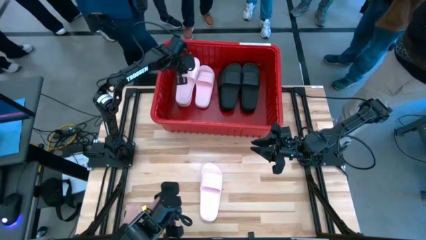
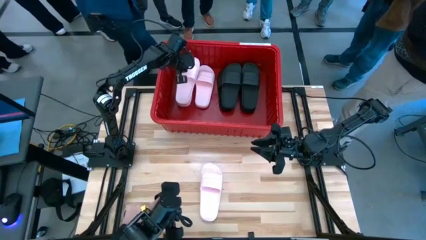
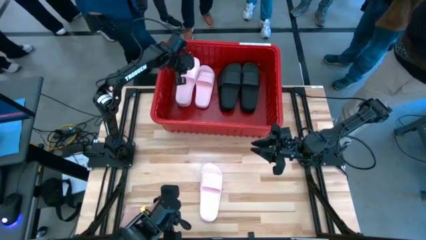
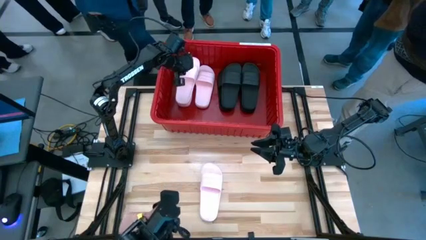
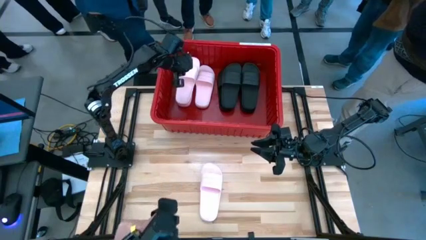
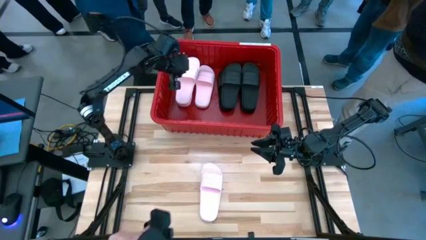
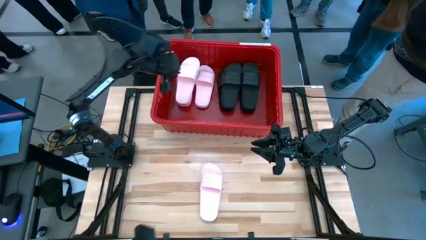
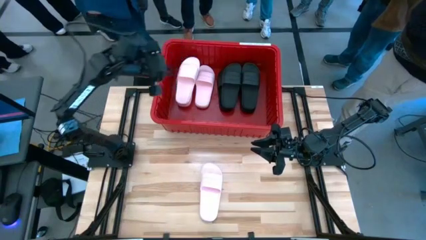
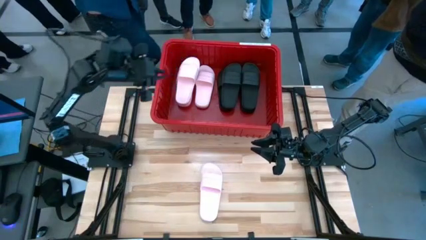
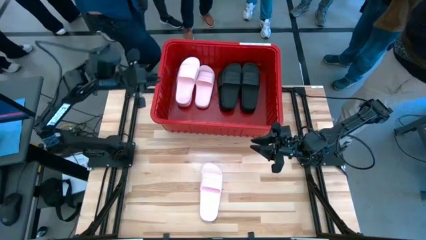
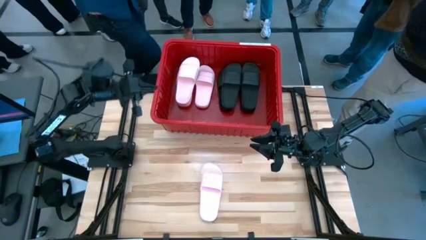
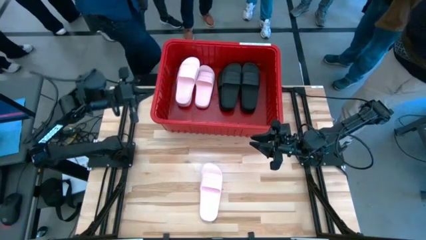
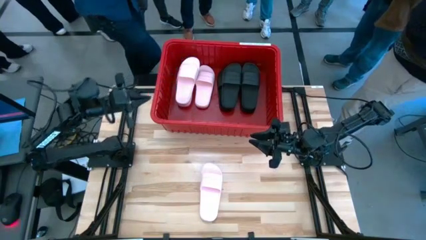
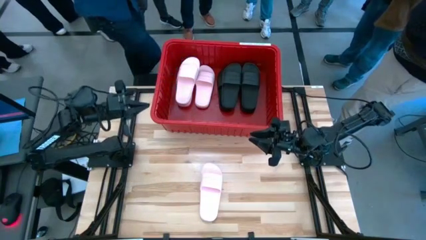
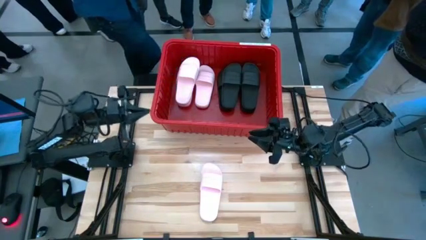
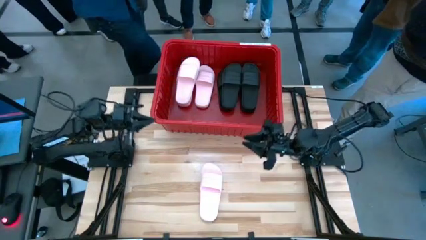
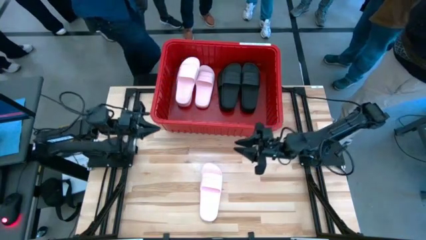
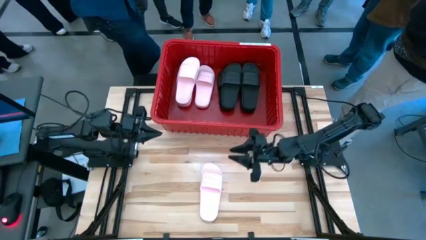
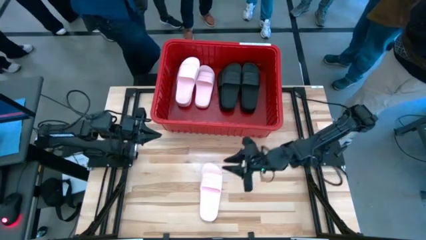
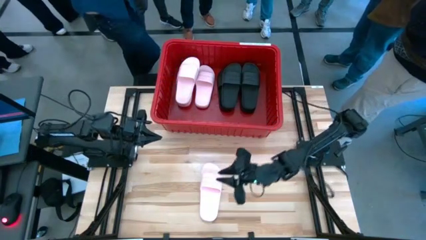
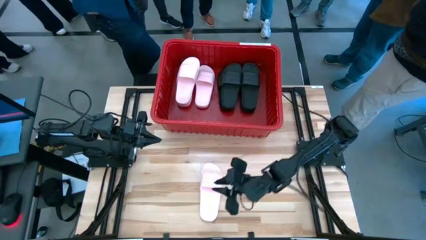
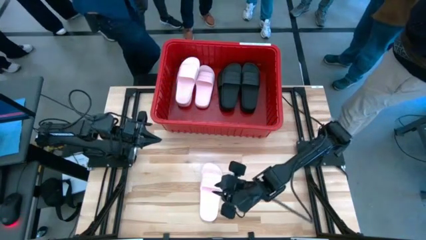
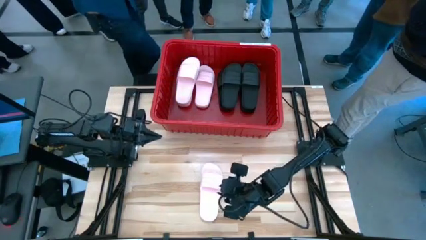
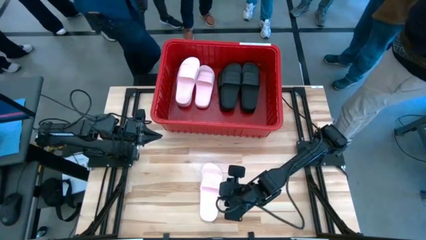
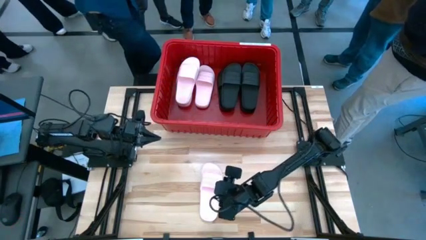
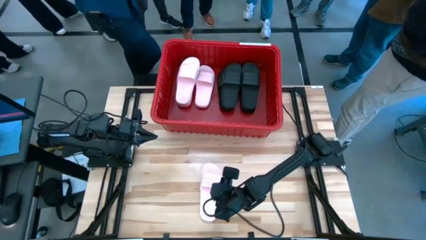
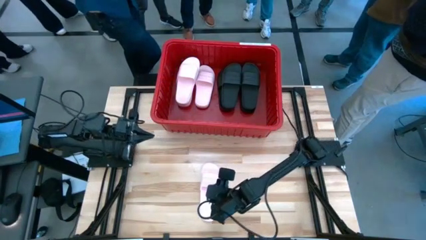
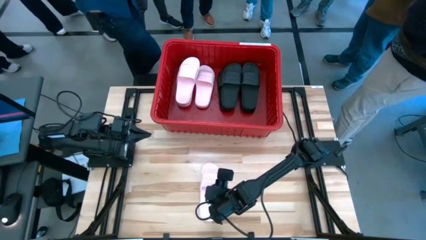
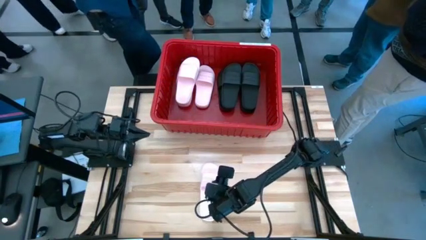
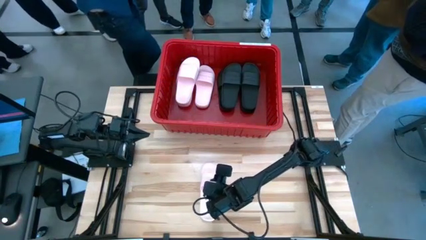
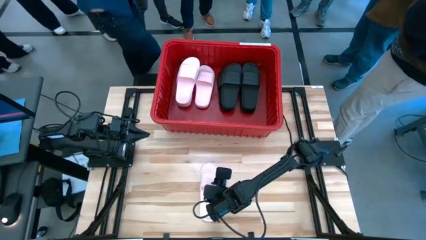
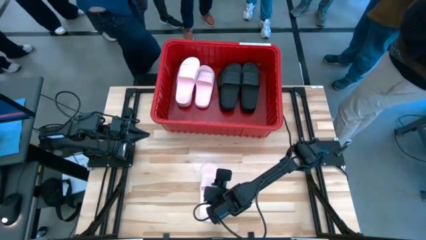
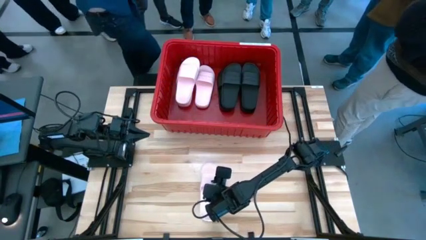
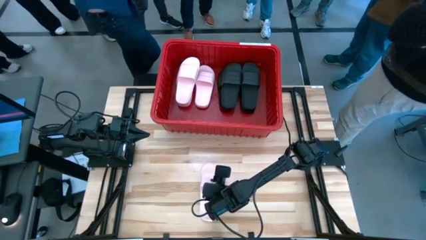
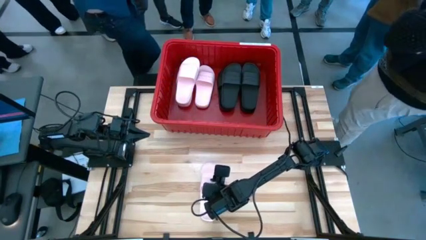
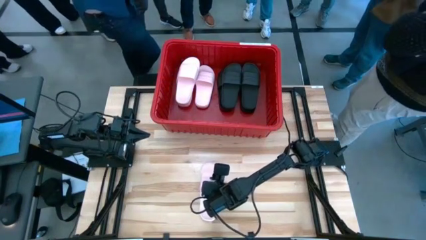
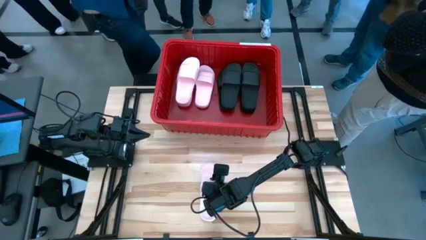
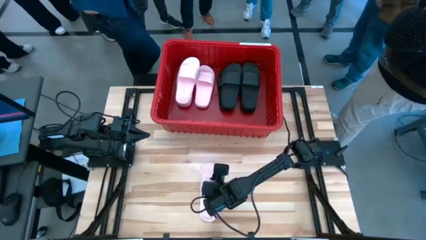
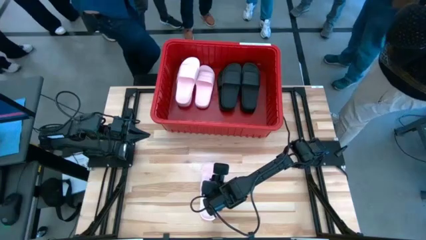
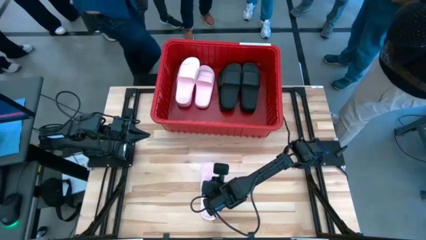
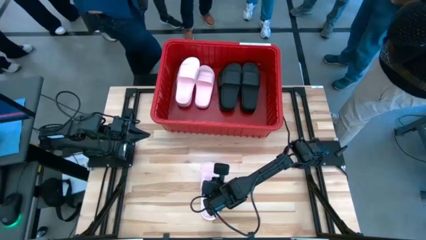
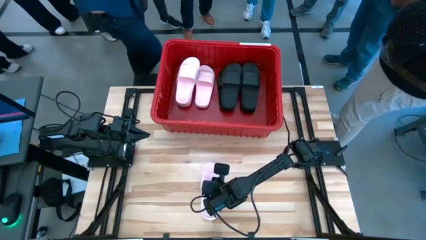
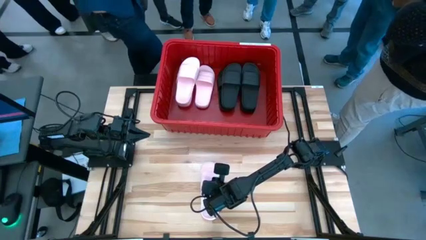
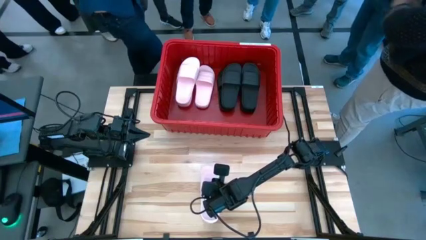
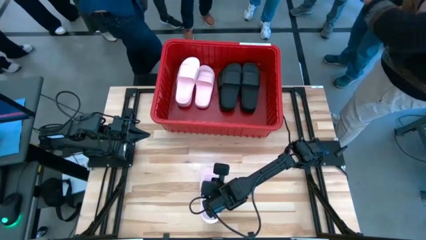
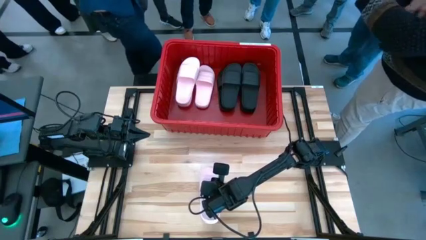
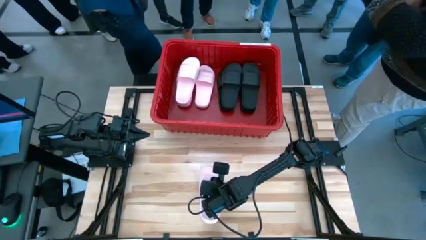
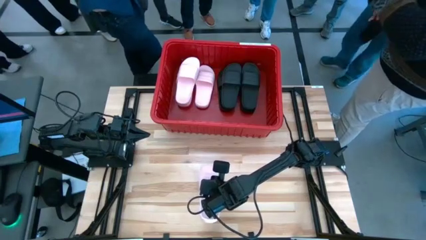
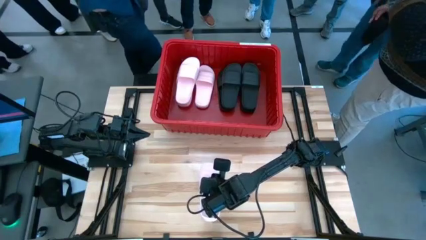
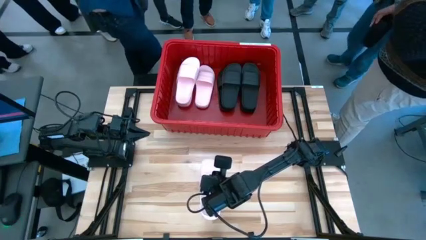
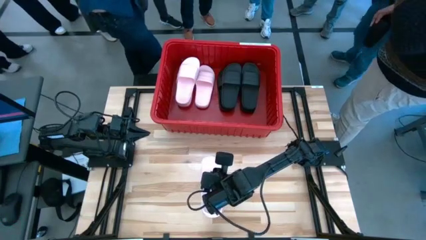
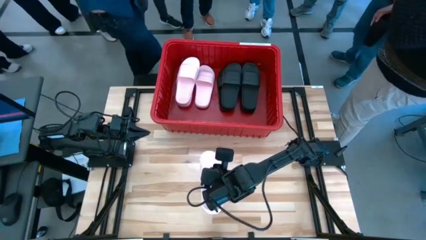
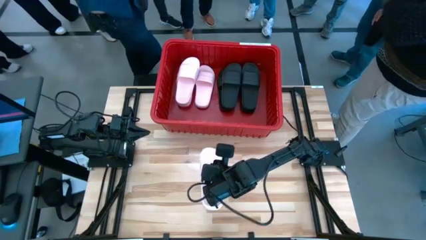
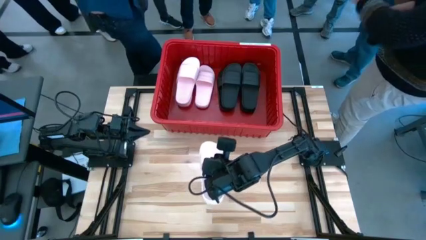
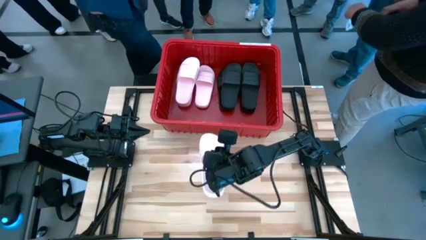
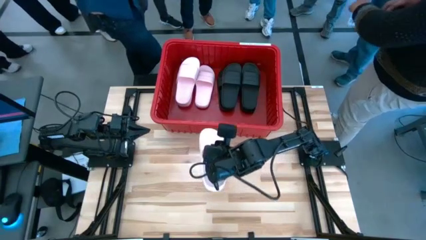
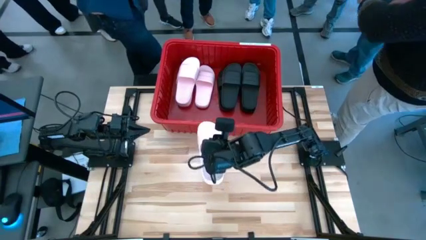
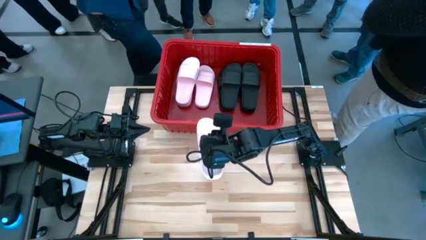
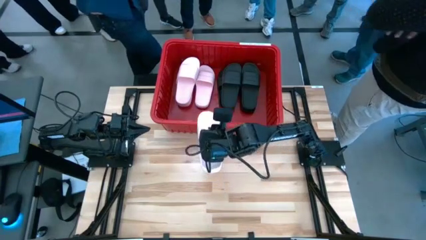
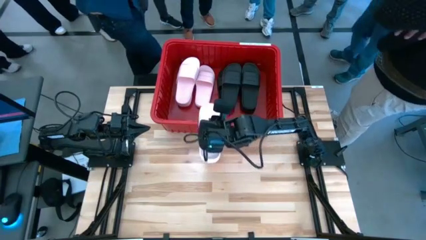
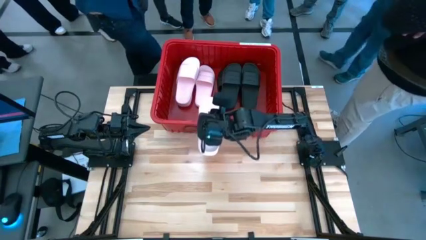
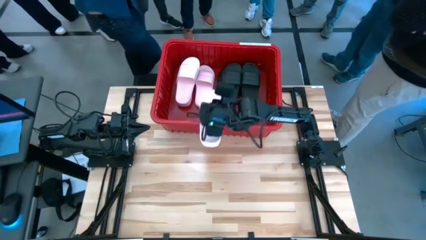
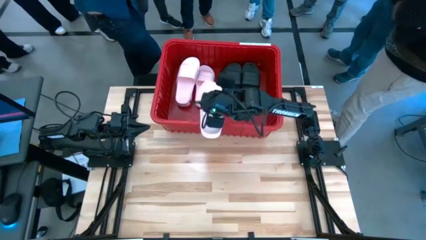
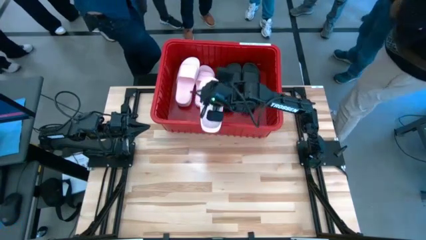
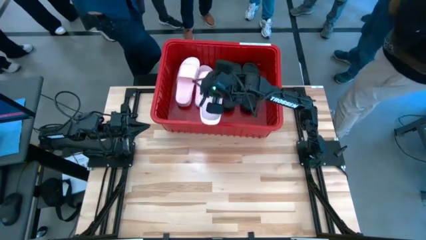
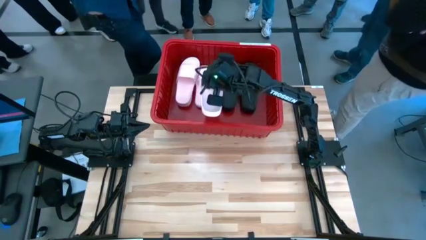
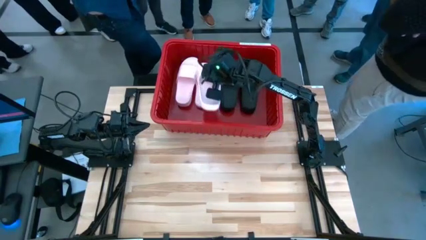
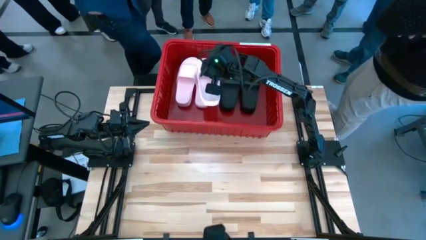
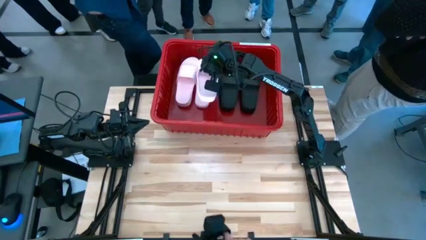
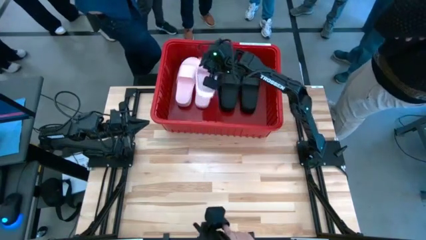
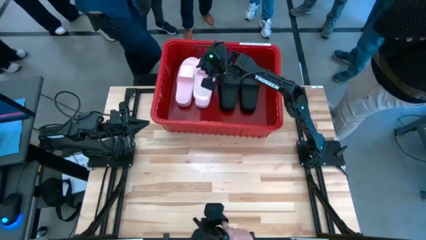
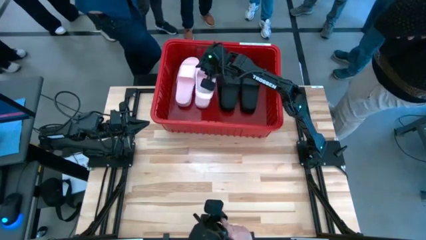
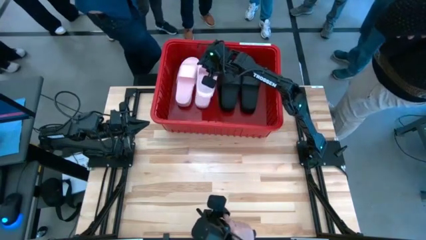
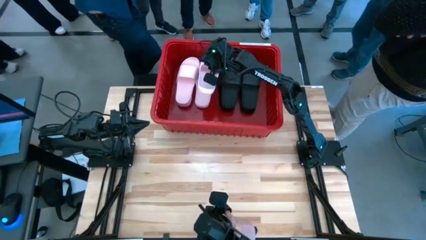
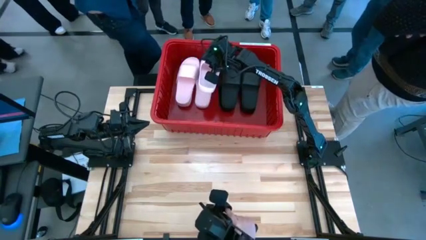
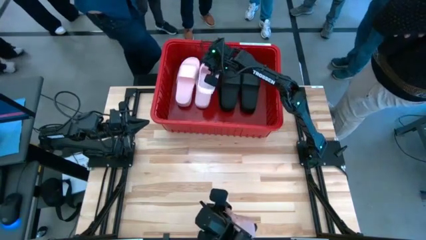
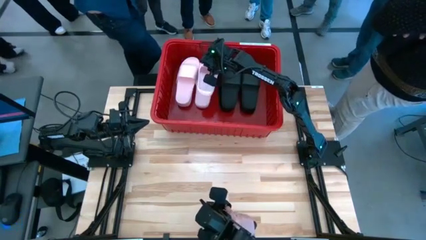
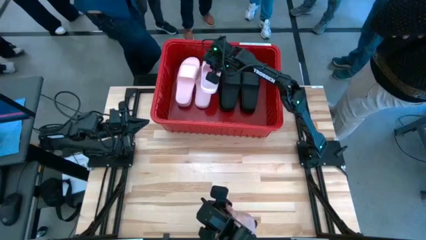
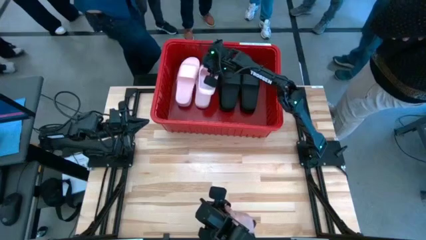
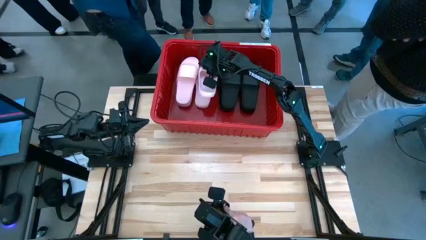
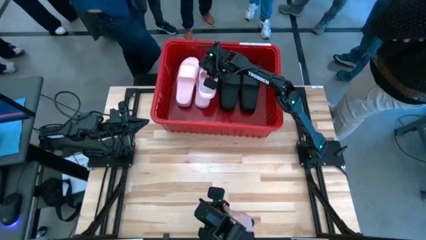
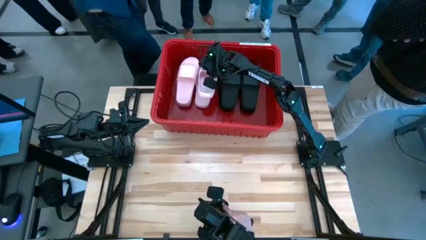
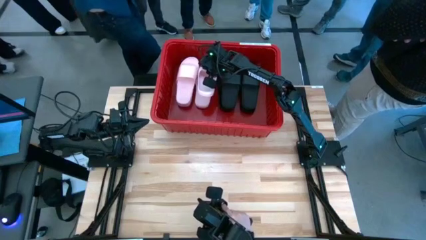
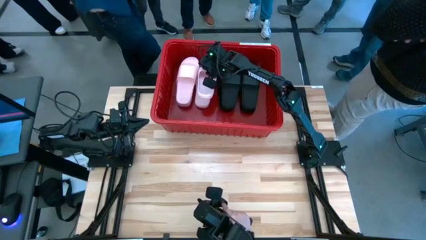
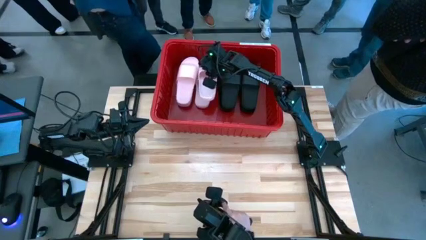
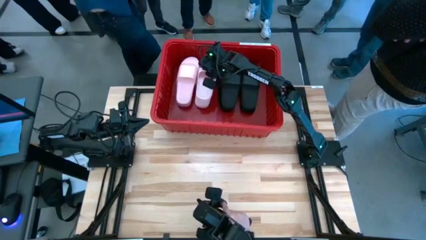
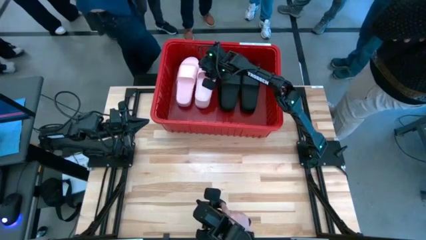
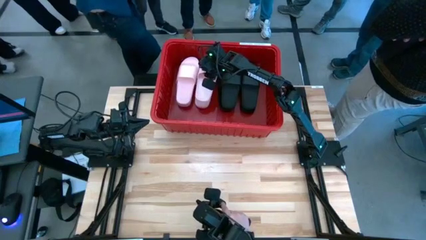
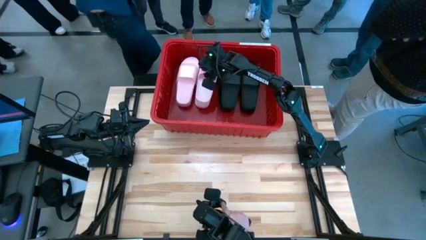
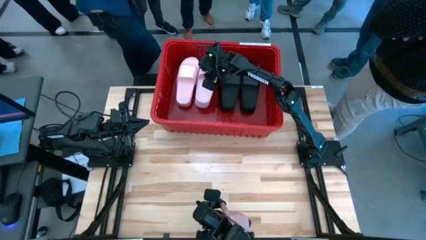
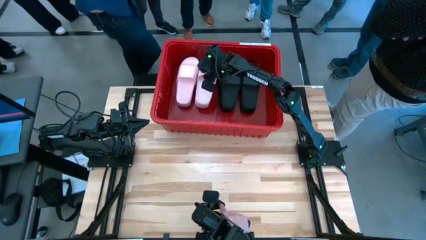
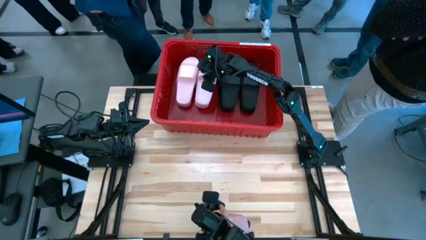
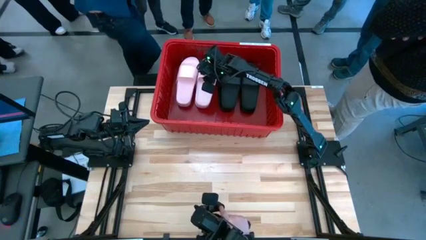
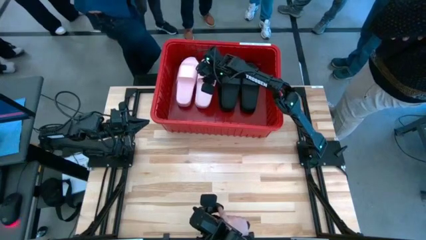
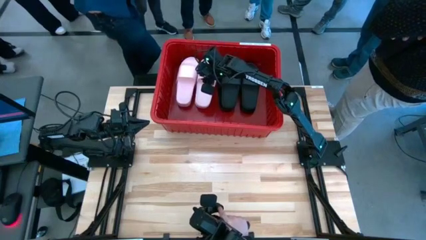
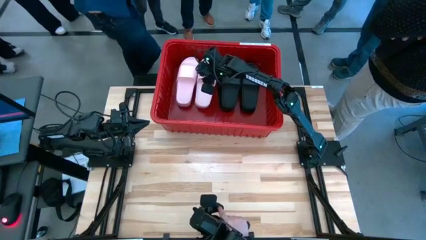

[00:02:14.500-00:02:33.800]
Task: Pick and place slides into bin
Put the pink slide into the red container
